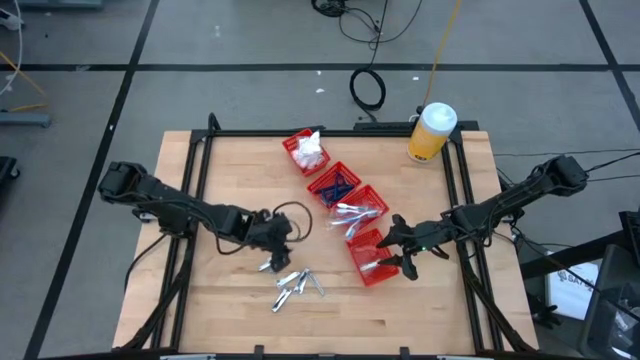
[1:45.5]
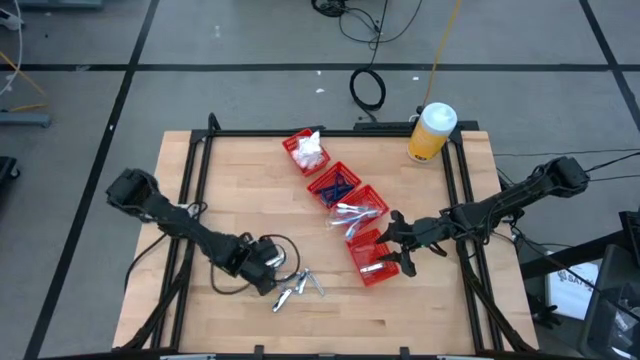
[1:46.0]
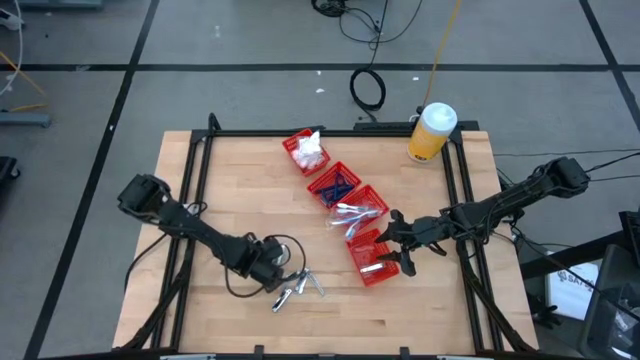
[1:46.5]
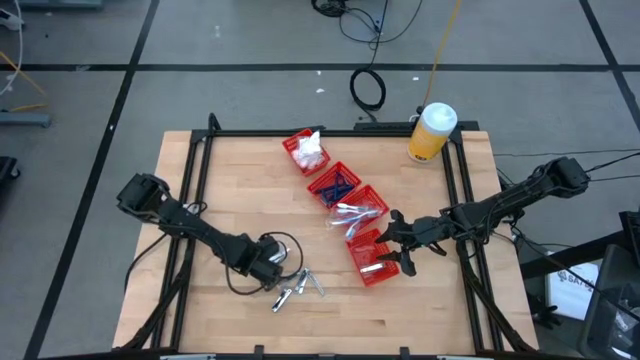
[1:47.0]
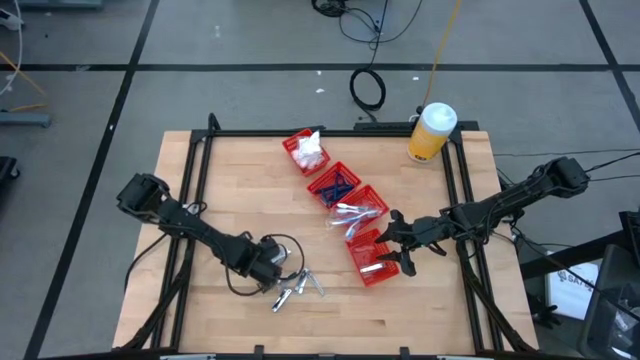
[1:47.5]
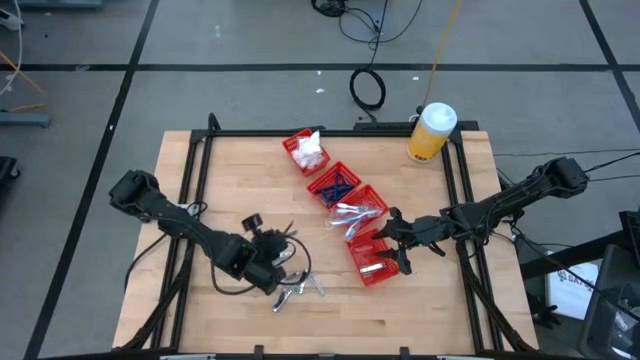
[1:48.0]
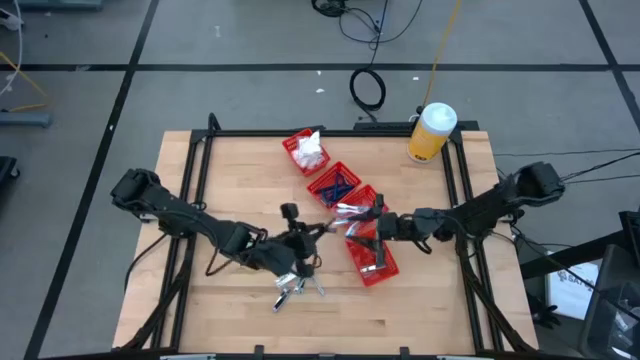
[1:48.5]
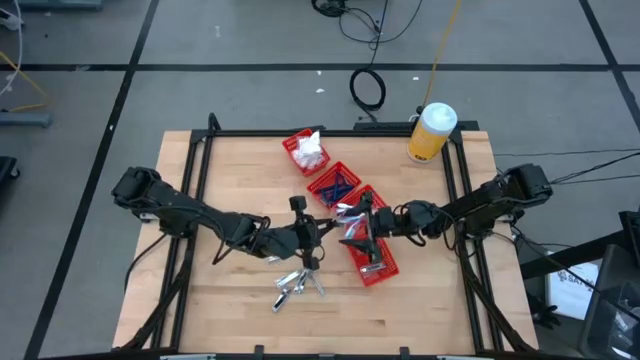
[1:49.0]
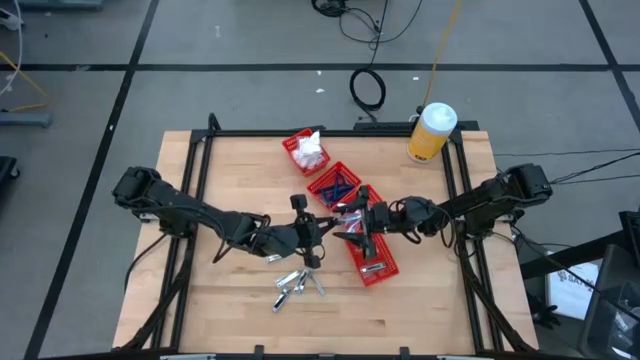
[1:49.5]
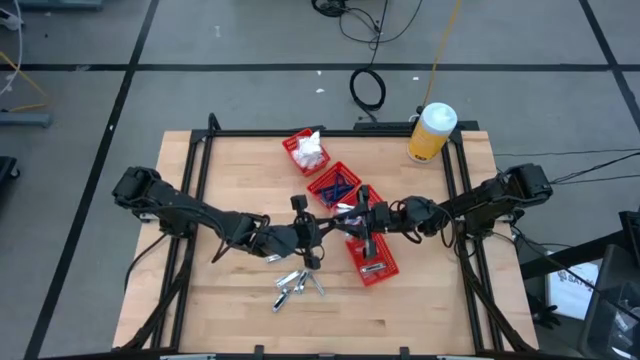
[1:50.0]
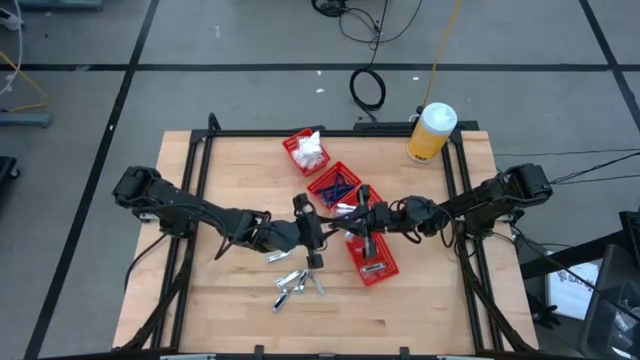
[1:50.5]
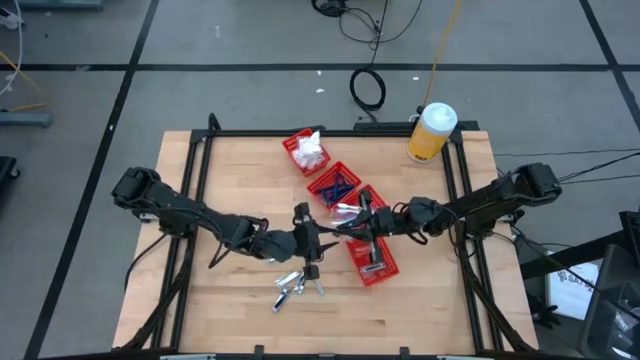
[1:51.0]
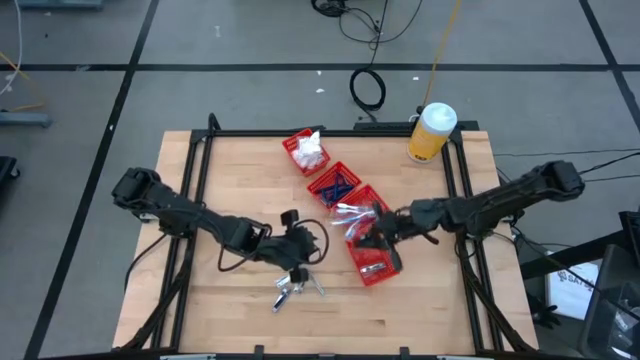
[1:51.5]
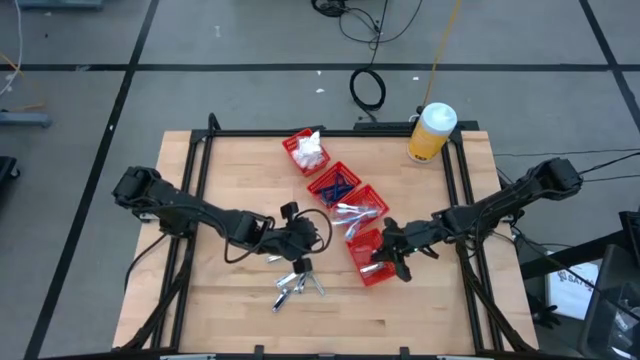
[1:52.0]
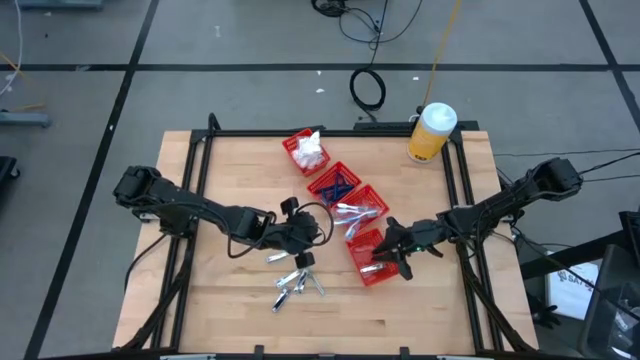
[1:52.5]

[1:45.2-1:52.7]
Task: Pick & Place Travel size toiletries
Put the nail cutter into the bottom red bin

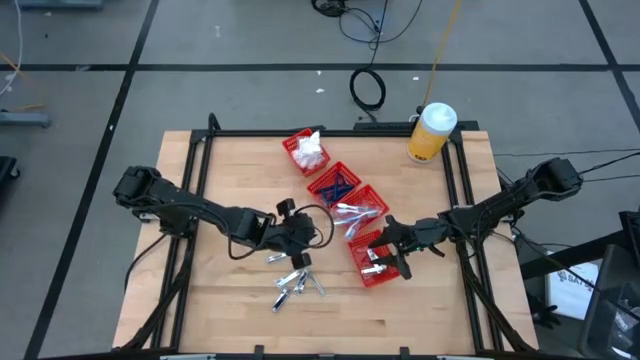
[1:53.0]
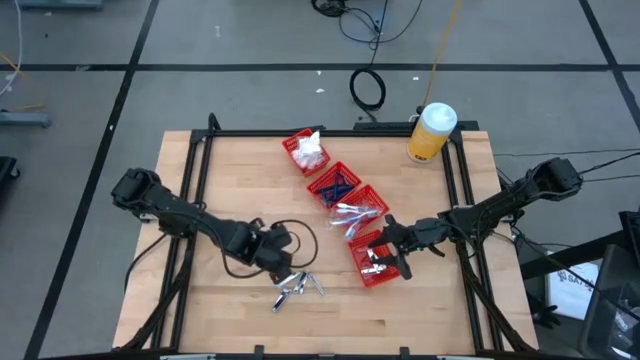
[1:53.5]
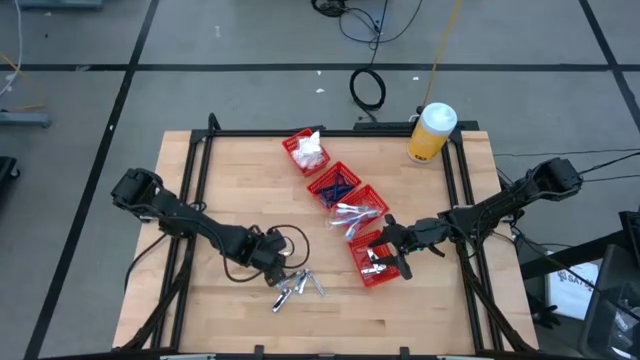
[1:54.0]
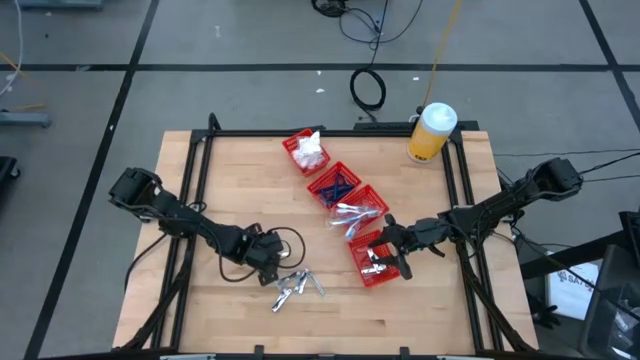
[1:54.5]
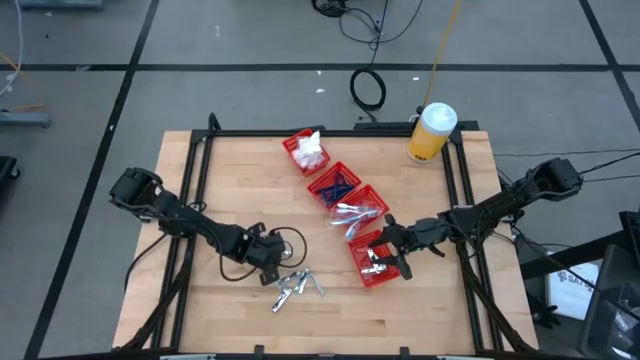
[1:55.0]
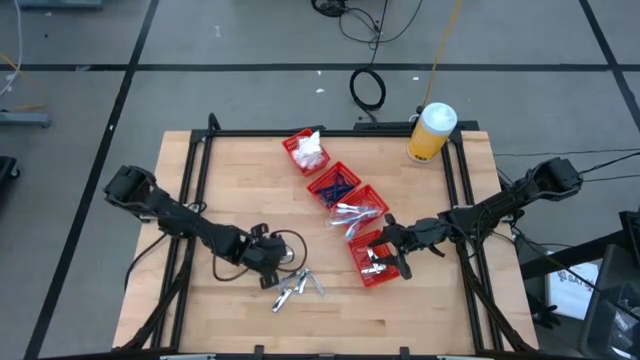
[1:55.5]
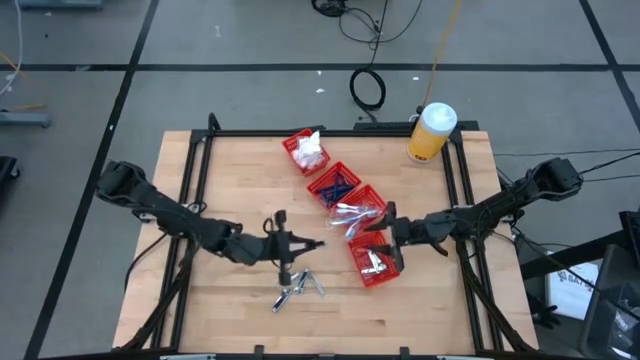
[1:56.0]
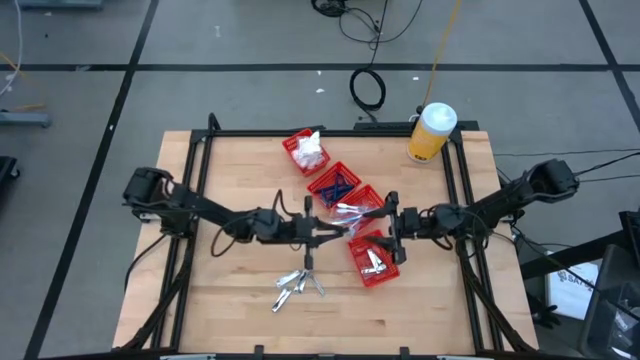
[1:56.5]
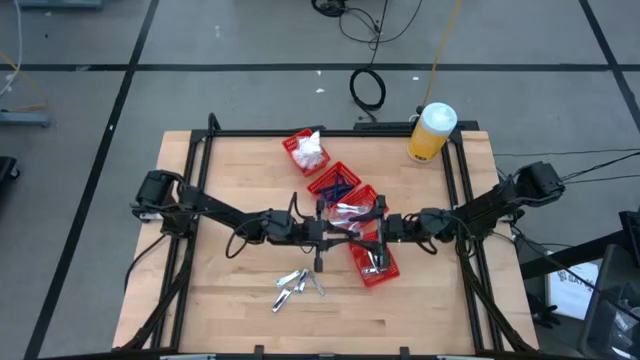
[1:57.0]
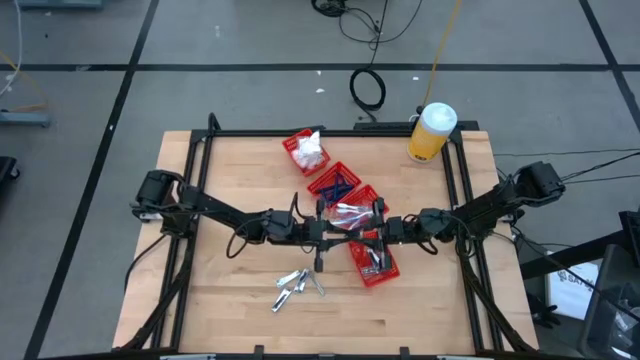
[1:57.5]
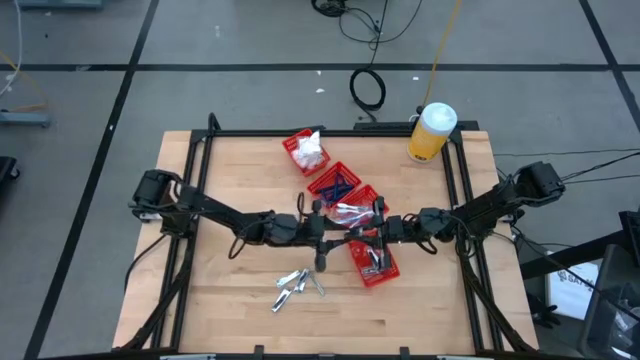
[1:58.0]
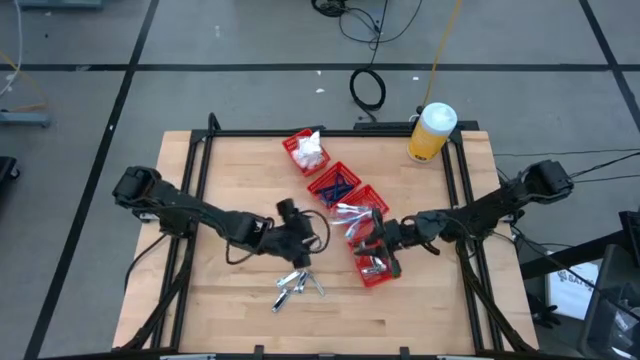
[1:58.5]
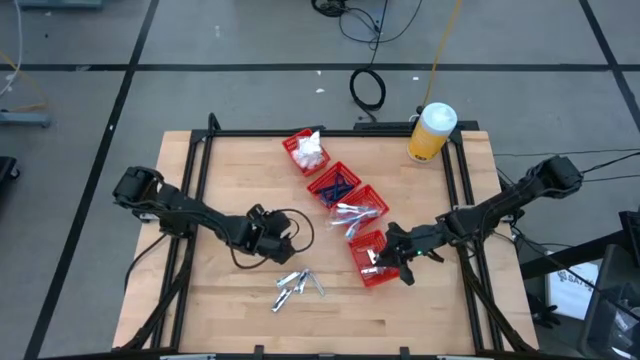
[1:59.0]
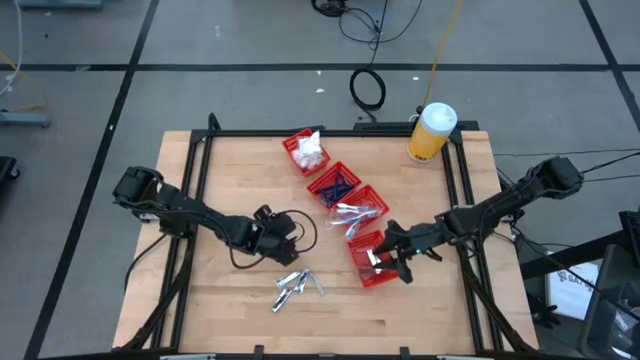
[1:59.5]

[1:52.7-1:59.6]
Put the nail cutter into the bottom red bin

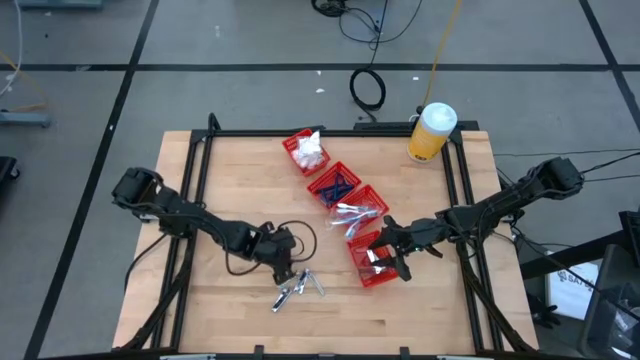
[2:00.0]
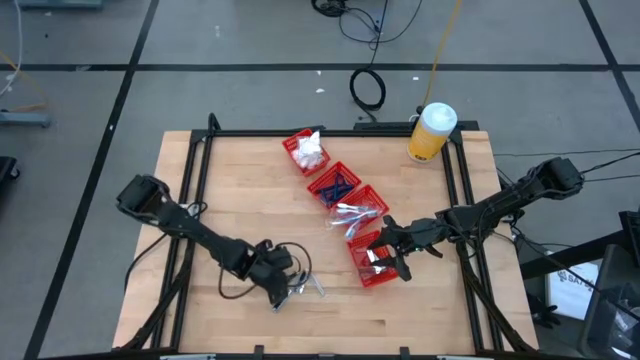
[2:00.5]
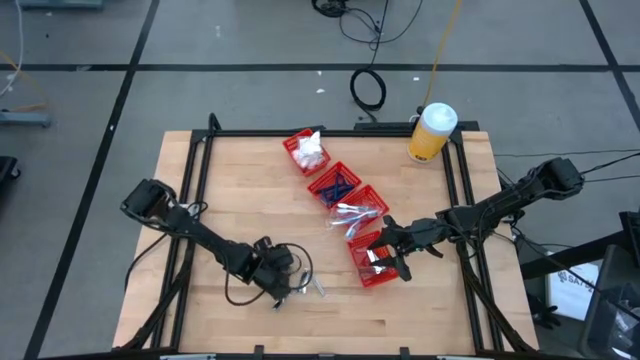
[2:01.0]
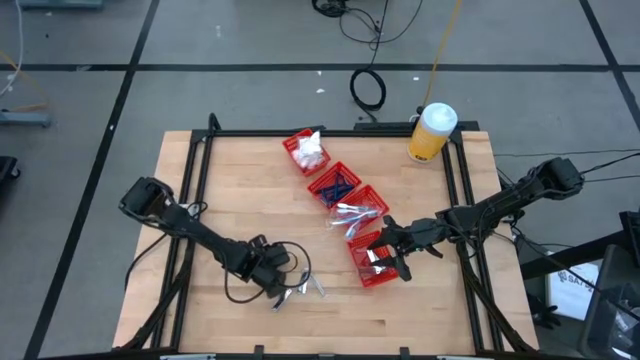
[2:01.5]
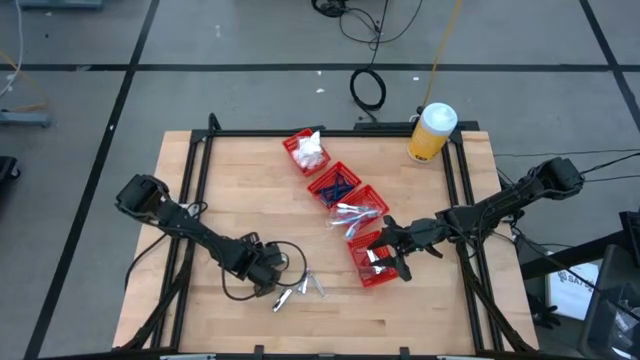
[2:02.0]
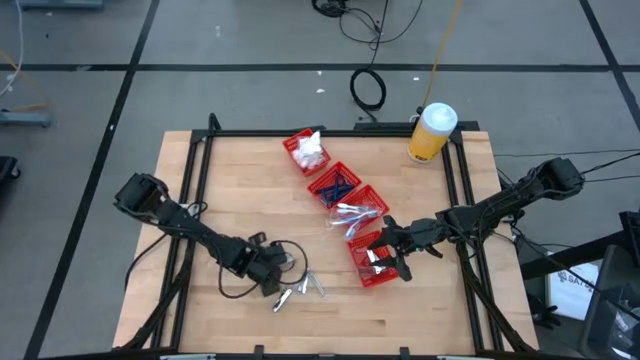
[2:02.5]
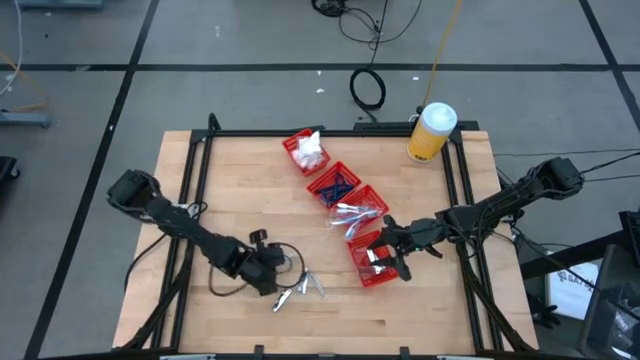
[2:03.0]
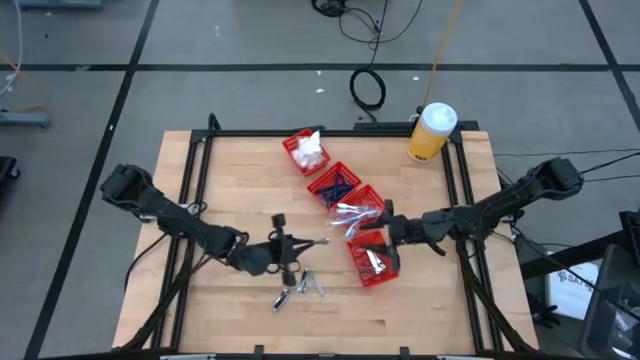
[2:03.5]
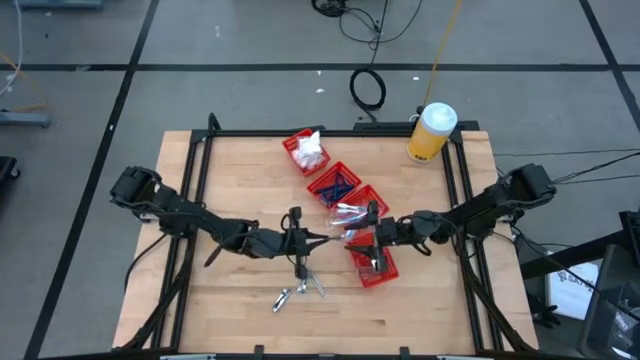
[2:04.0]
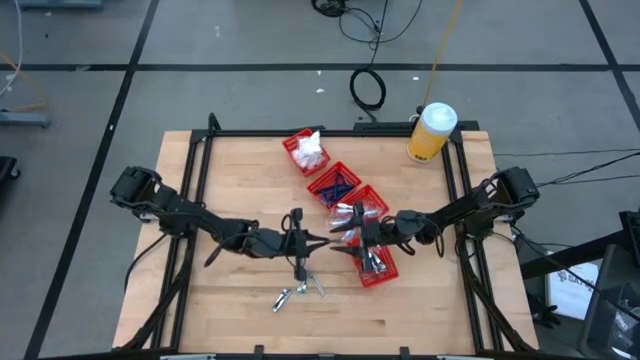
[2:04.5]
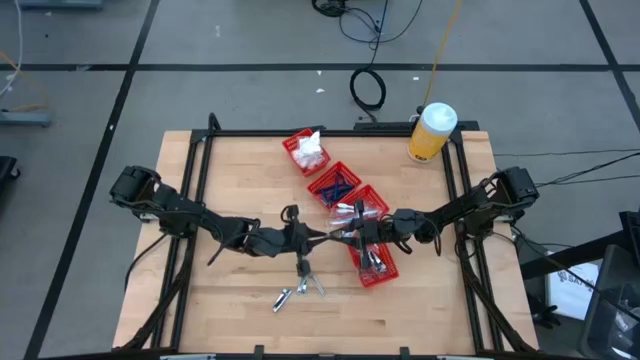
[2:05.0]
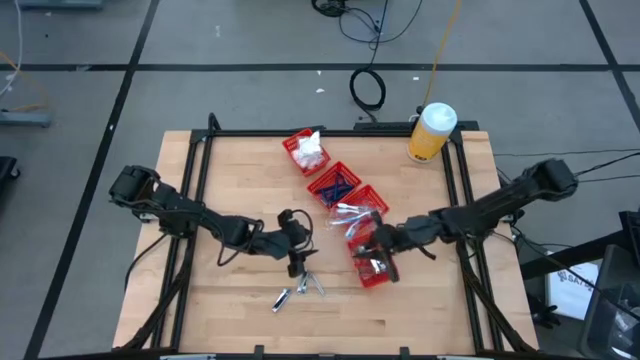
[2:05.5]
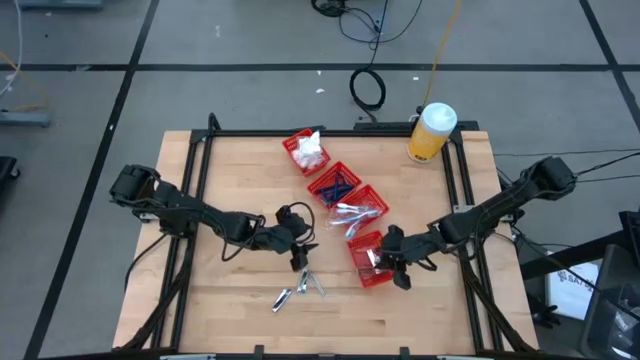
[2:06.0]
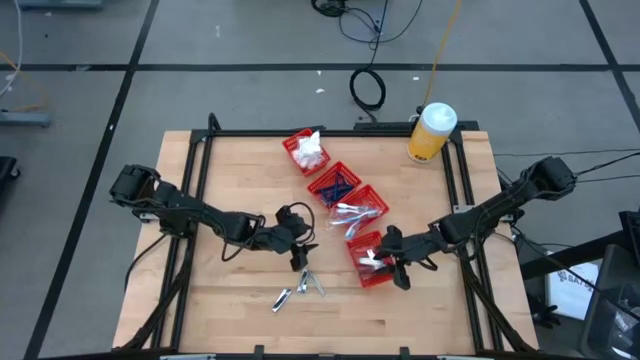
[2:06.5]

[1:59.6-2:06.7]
Put the nail cutter into the bottom red bin
